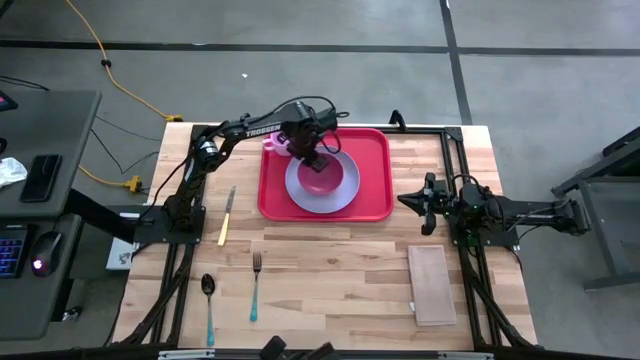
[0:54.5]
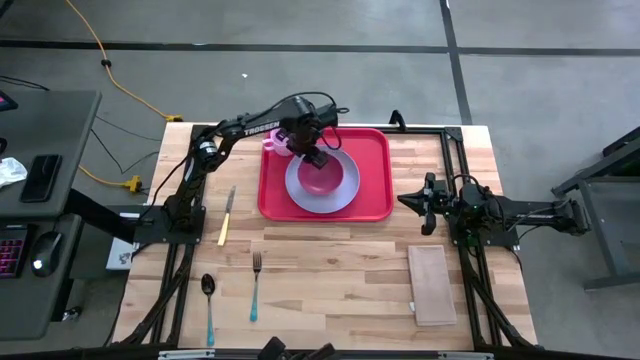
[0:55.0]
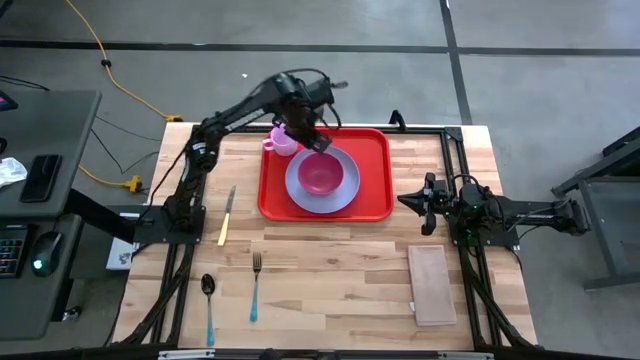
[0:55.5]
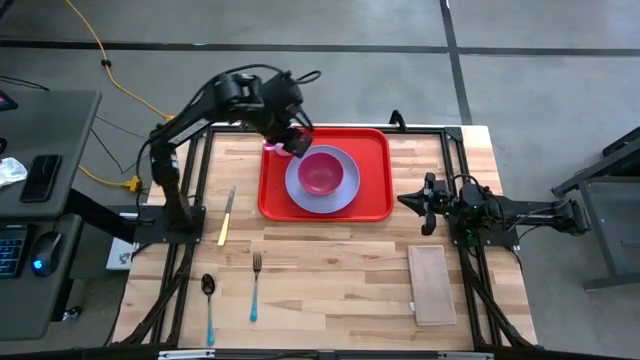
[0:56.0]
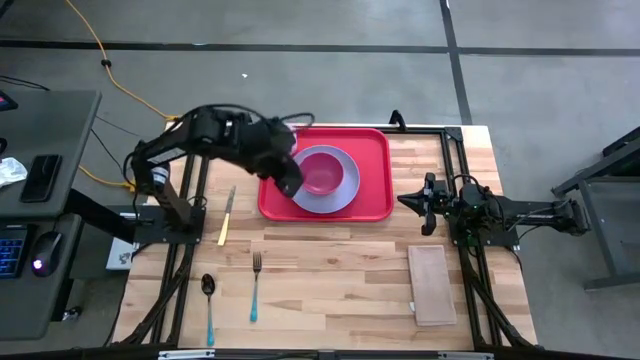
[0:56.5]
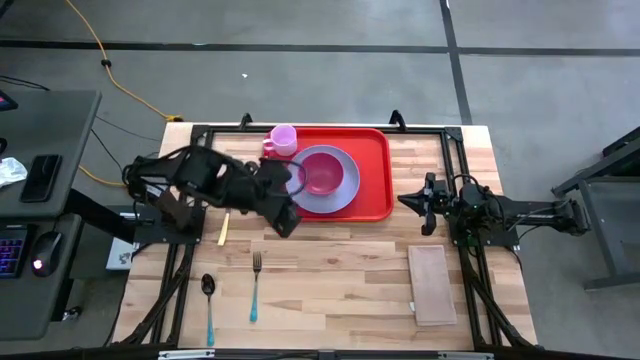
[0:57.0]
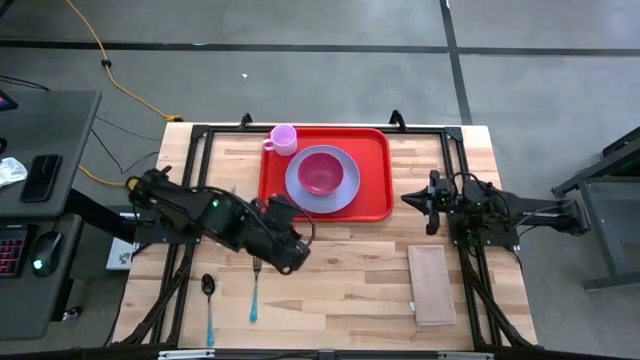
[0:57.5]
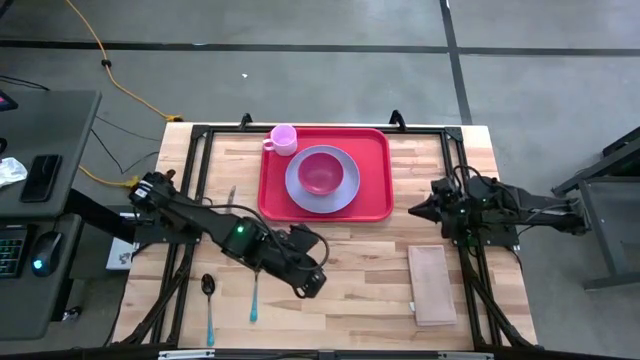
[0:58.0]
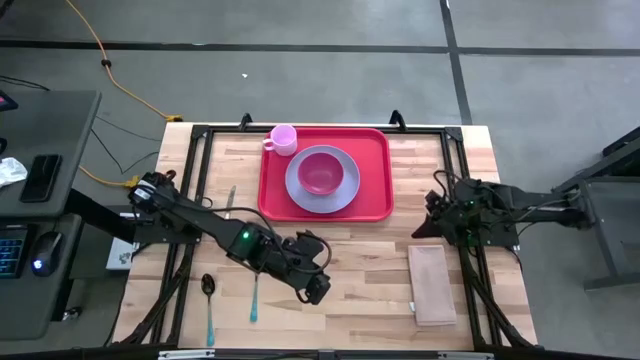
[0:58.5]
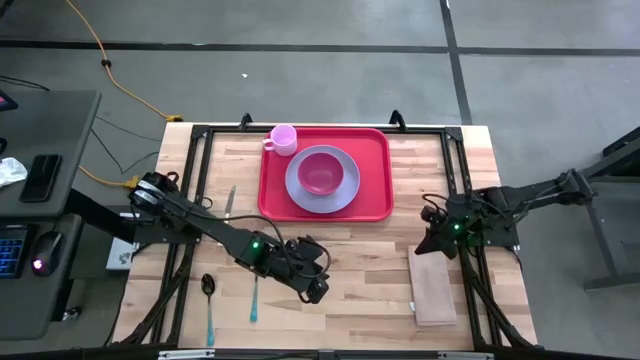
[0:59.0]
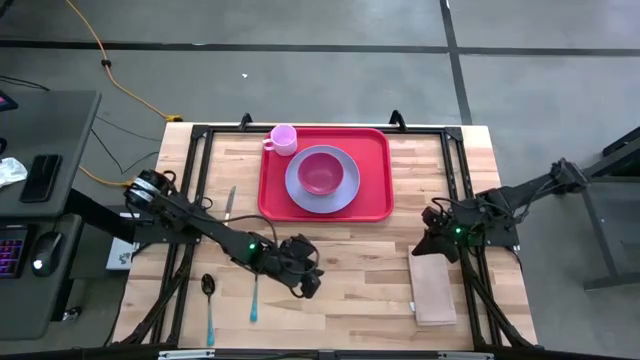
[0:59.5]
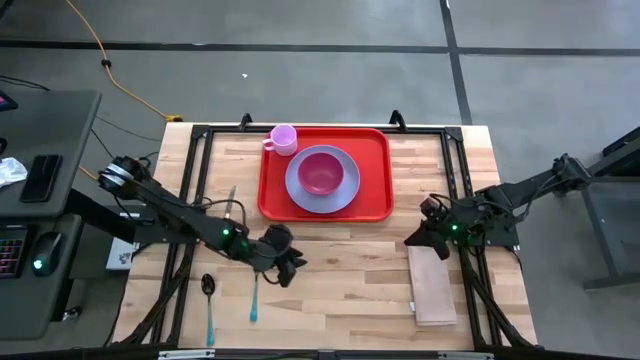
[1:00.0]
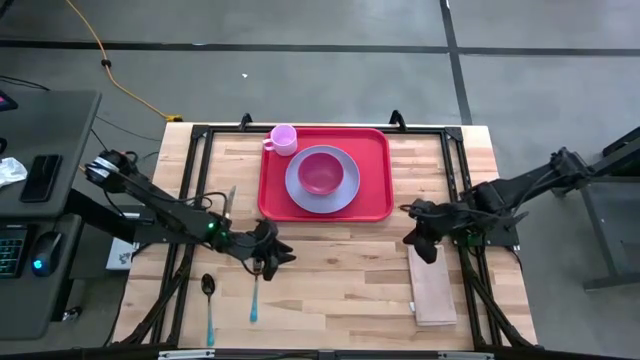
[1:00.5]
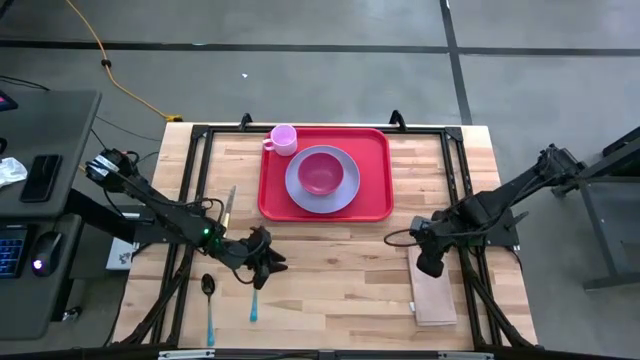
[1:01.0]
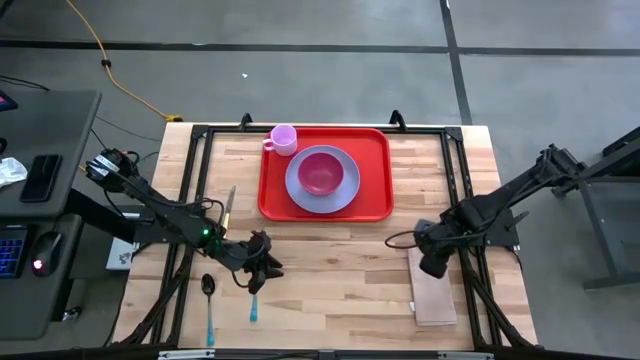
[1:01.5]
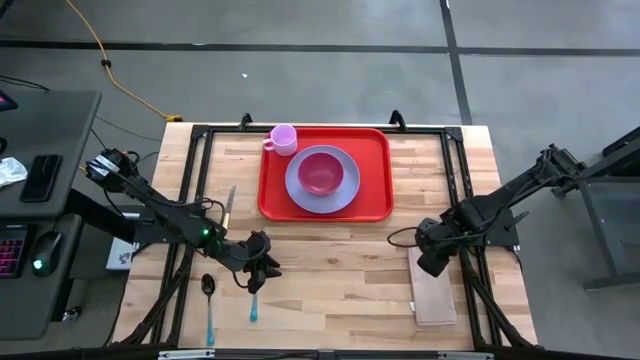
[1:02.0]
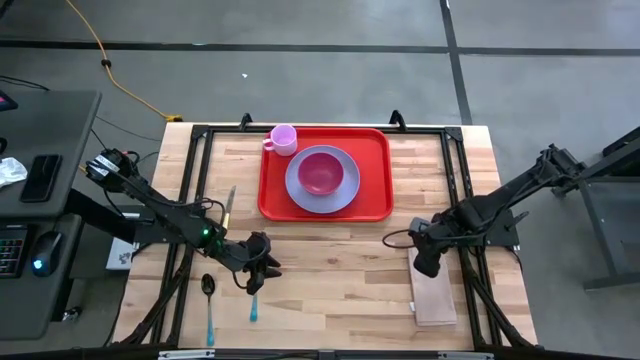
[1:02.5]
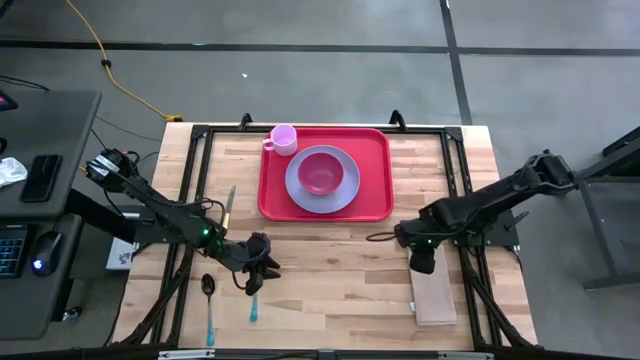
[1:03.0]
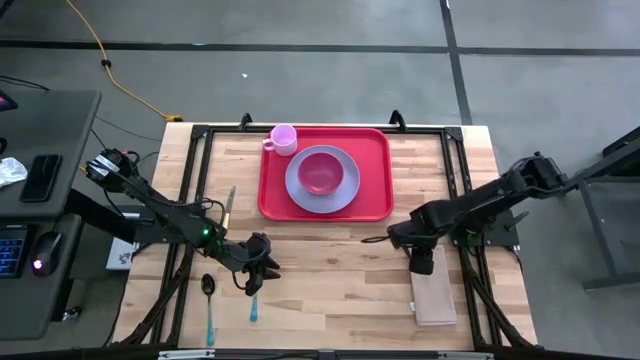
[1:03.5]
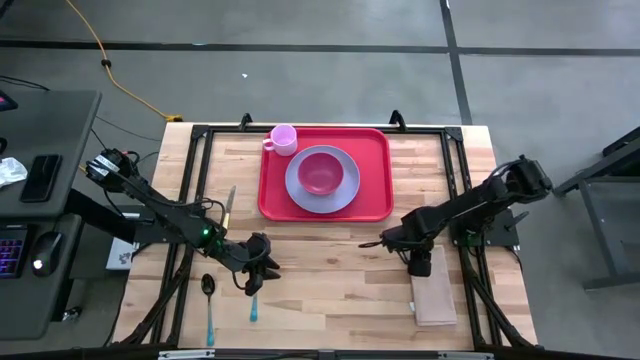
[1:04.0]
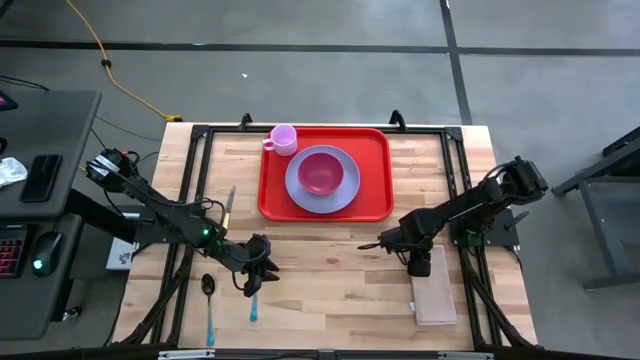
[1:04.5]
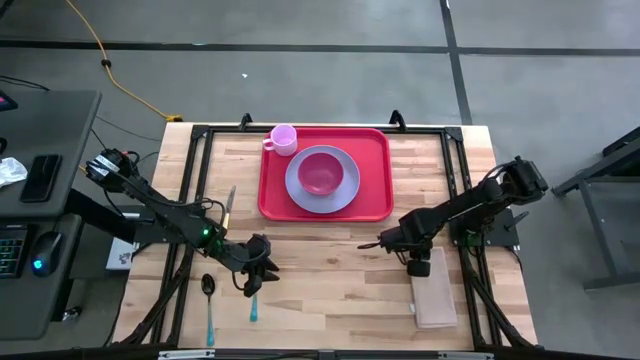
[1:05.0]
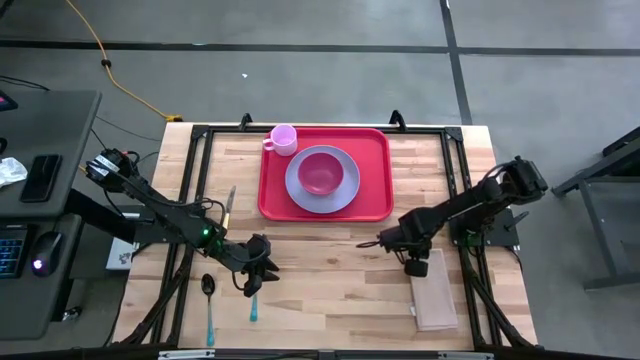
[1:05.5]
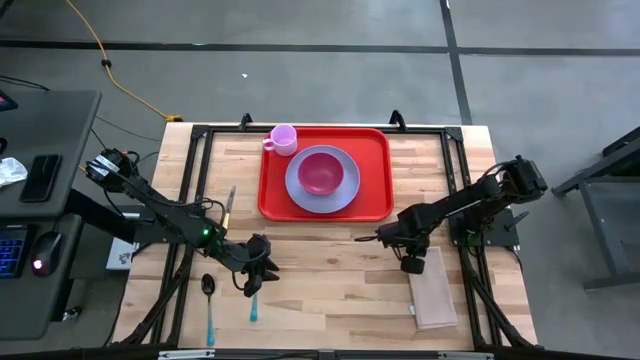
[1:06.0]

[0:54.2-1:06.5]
Task: Set up tray
Put the brown napkin to the left of the blue plate on the orange serving tray

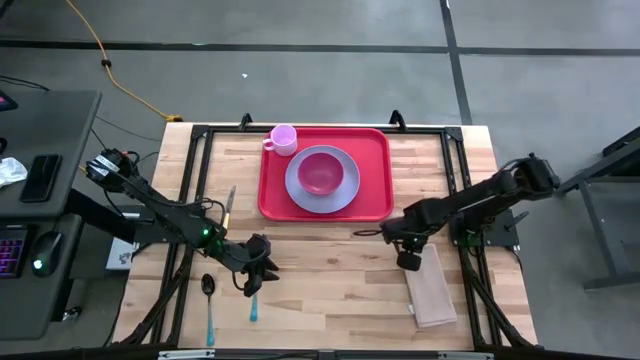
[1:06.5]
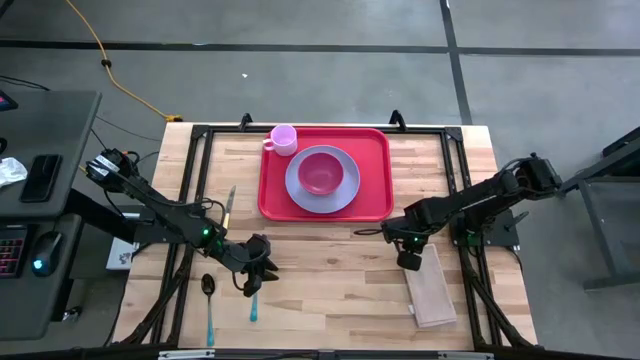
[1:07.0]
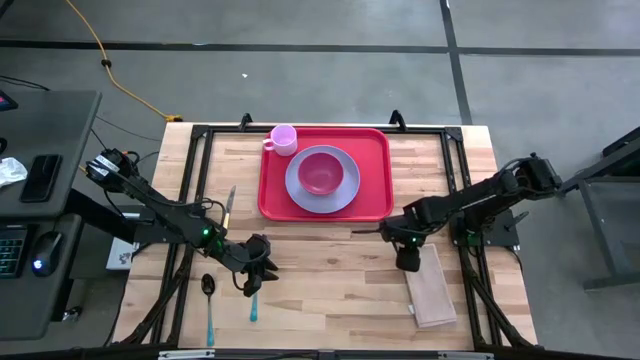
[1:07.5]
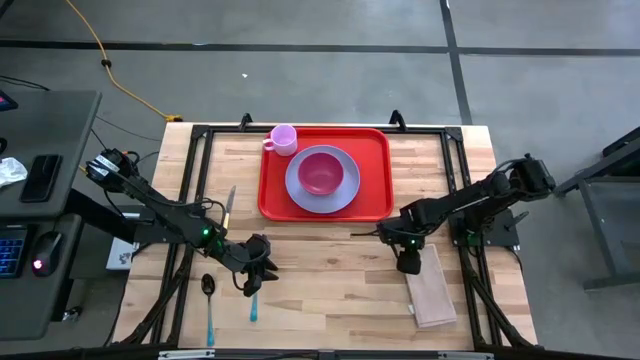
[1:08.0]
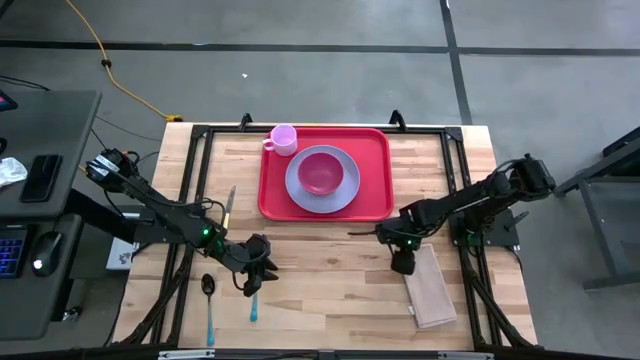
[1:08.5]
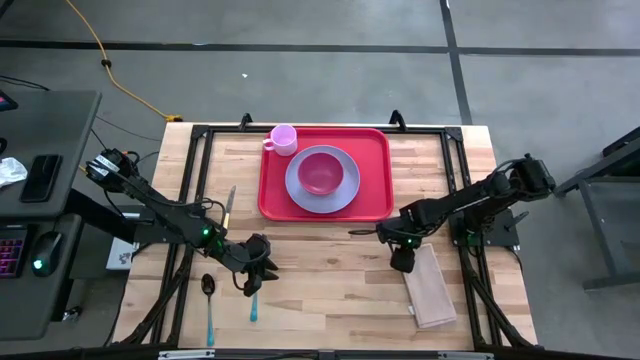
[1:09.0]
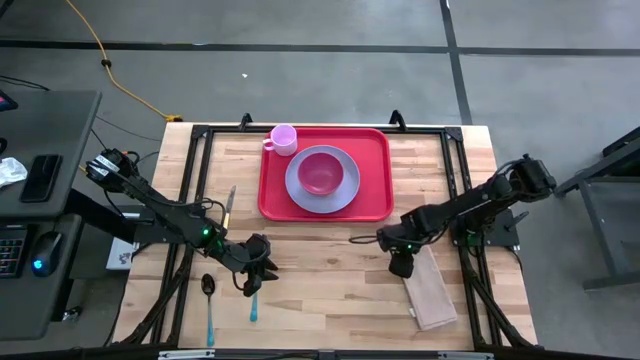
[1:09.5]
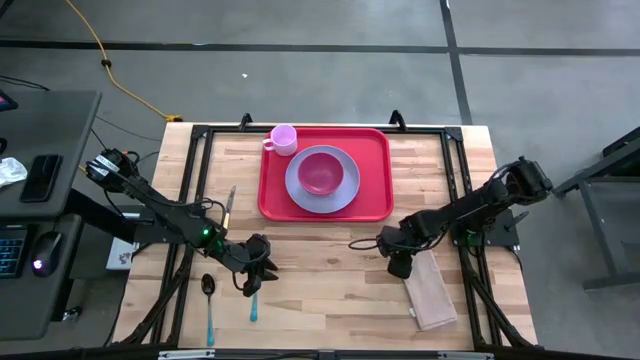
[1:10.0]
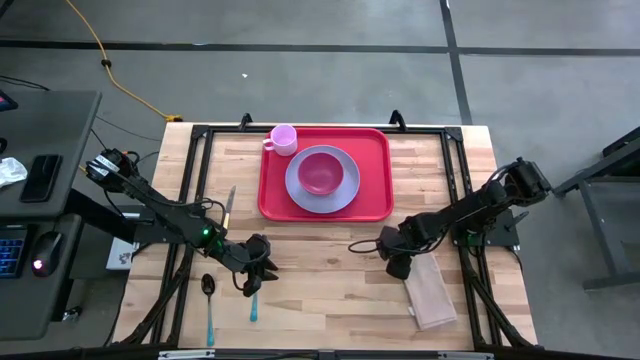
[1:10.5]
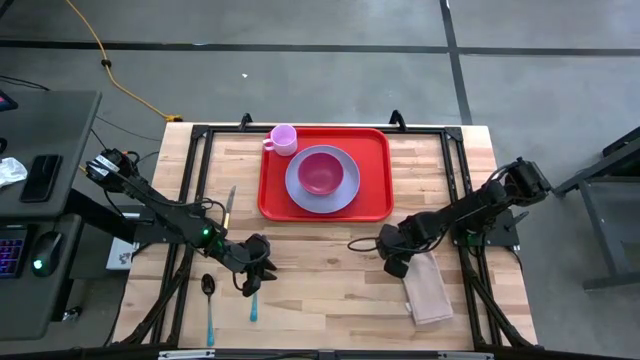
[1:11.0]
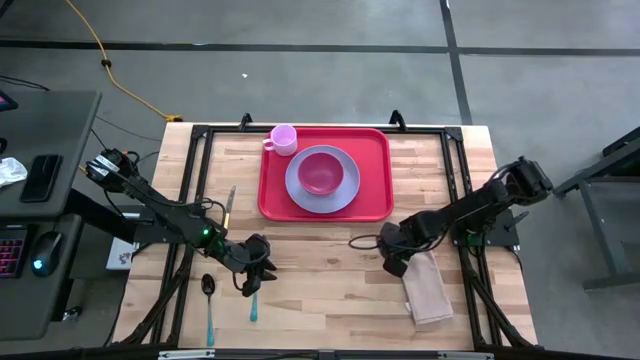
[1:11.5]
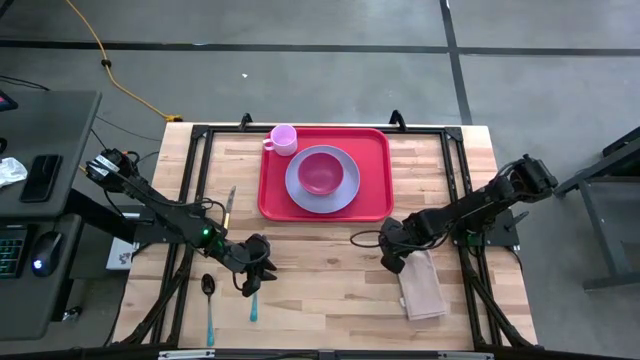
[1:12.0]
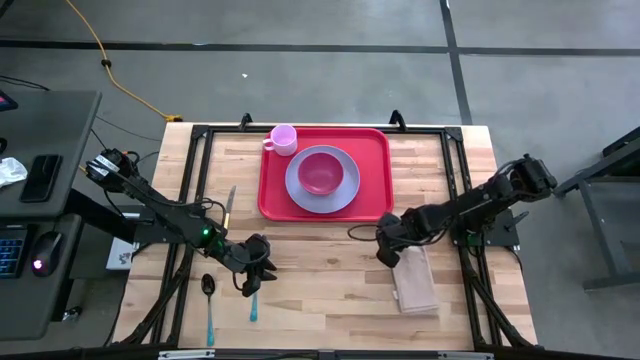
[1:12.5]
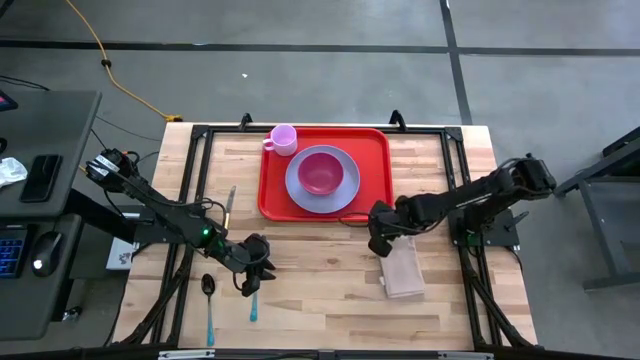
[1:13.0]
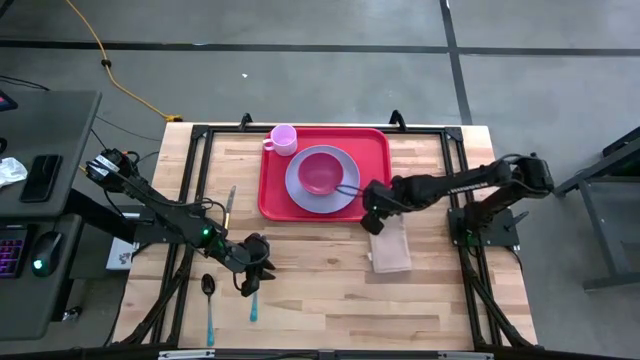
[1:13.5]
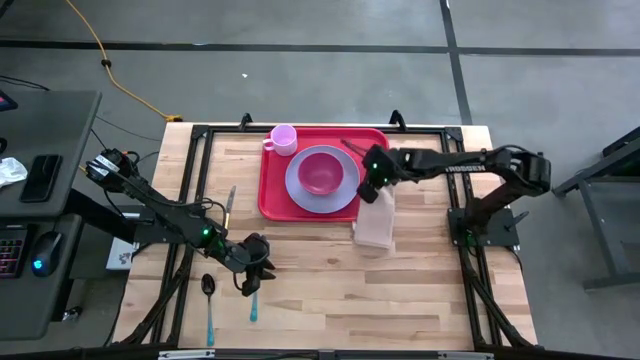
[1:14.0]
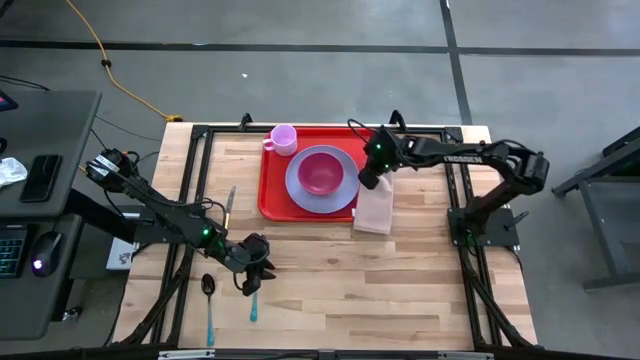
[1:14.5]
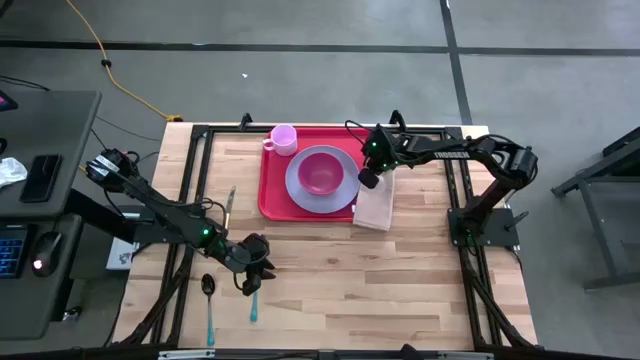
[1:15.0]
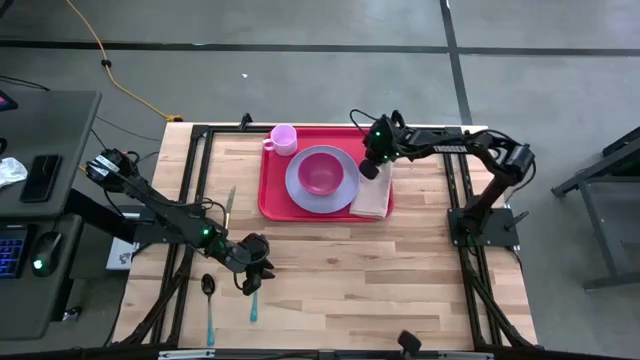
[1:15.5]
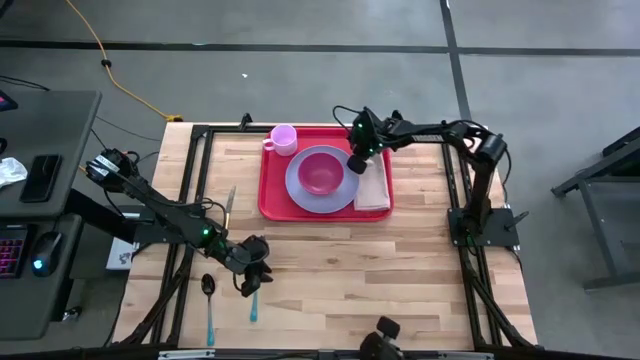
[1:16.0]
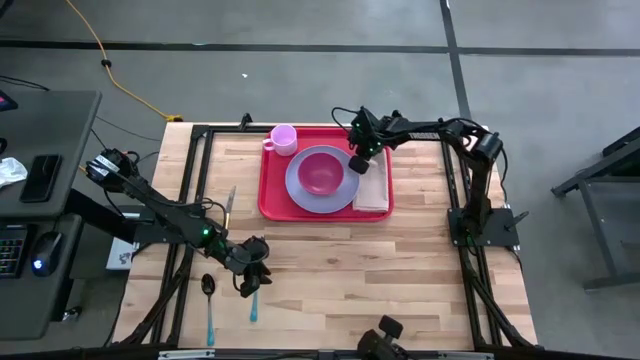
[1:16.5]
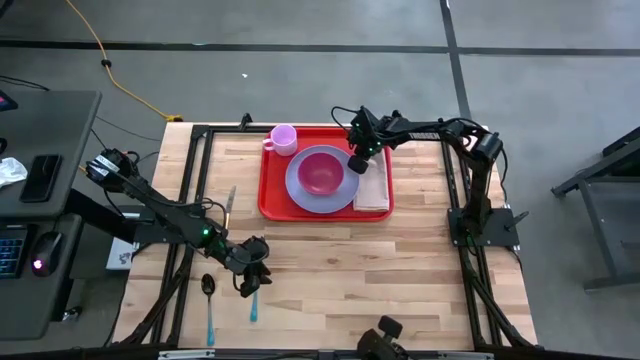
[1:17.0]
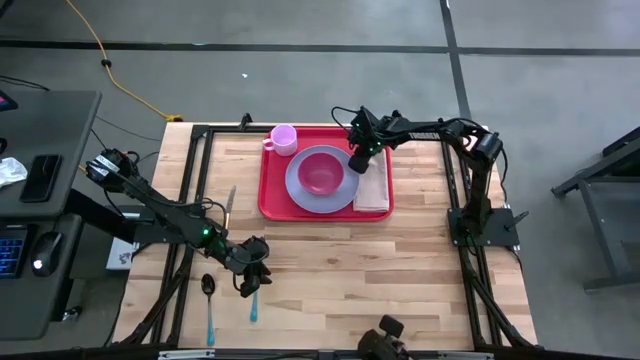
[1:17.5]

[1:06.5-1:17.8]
Put the brown napkin to the left of the blue plate on the orange serving tray
